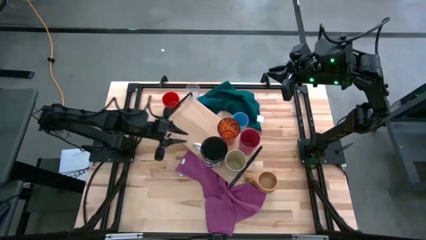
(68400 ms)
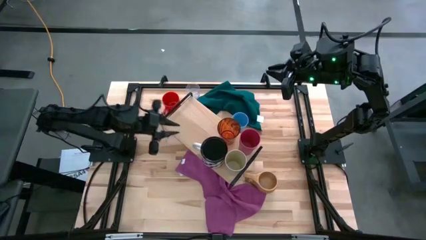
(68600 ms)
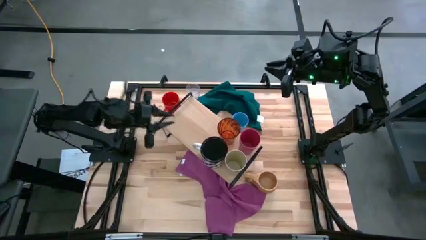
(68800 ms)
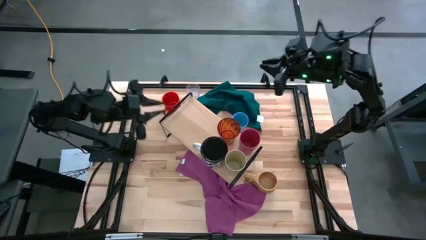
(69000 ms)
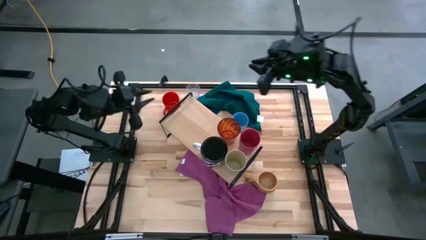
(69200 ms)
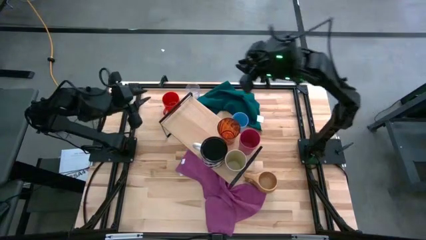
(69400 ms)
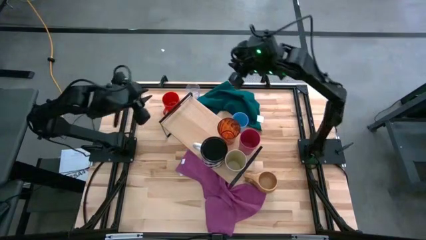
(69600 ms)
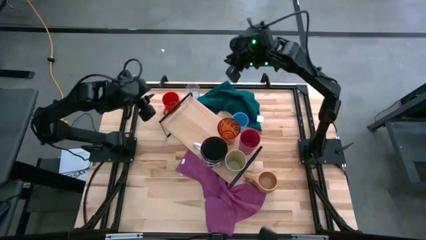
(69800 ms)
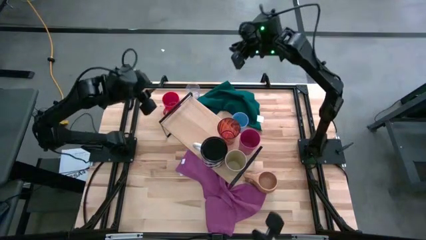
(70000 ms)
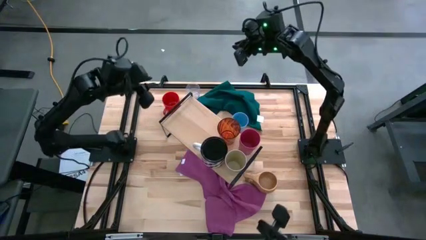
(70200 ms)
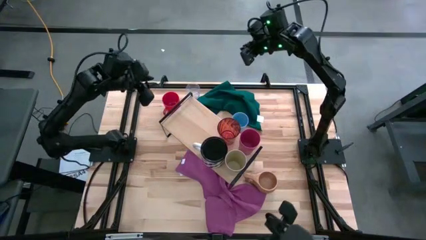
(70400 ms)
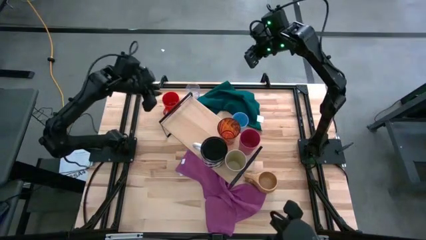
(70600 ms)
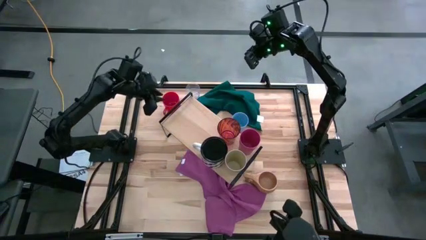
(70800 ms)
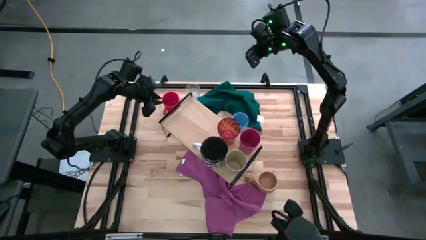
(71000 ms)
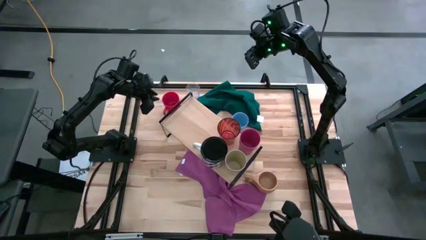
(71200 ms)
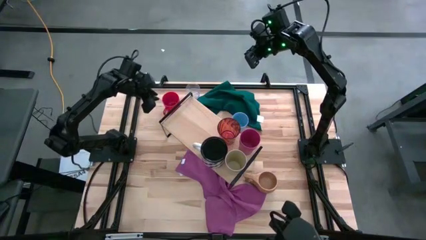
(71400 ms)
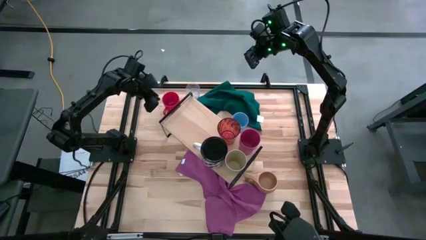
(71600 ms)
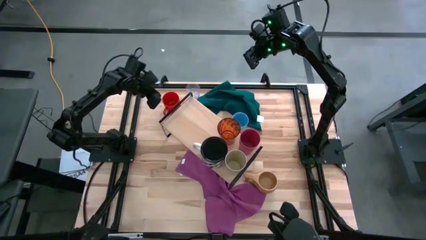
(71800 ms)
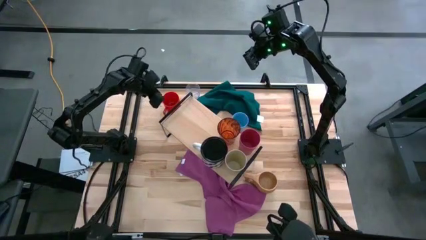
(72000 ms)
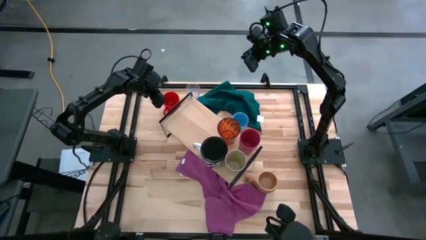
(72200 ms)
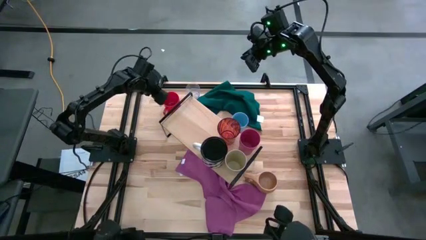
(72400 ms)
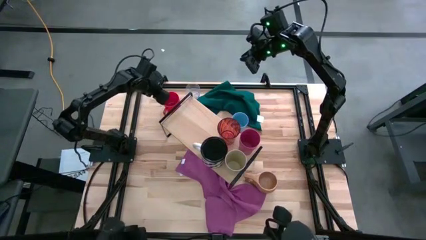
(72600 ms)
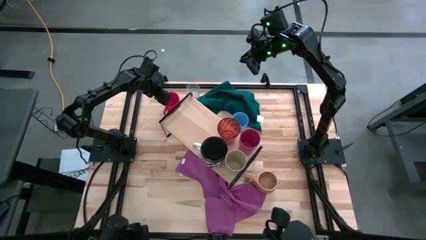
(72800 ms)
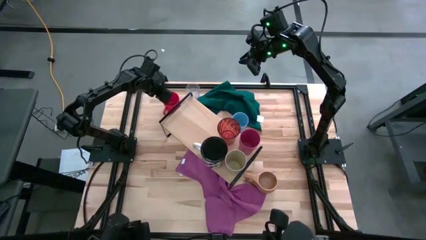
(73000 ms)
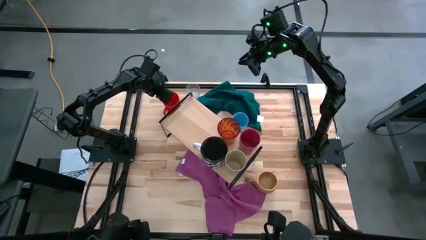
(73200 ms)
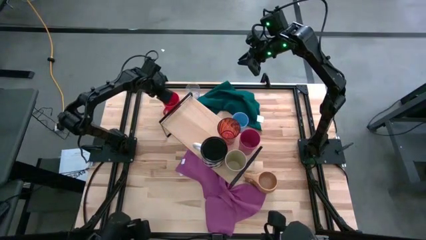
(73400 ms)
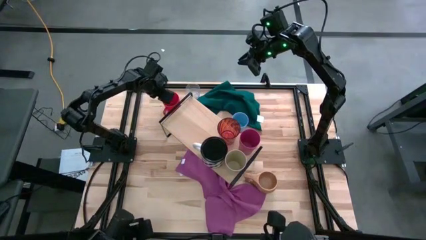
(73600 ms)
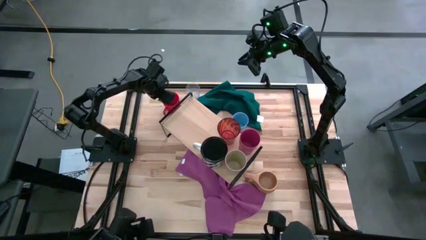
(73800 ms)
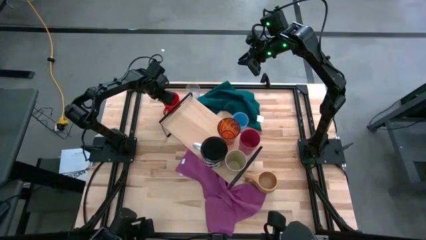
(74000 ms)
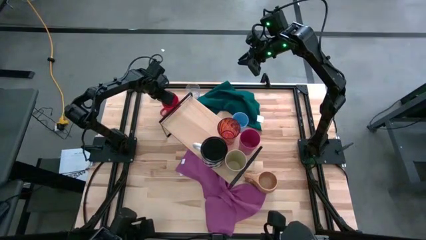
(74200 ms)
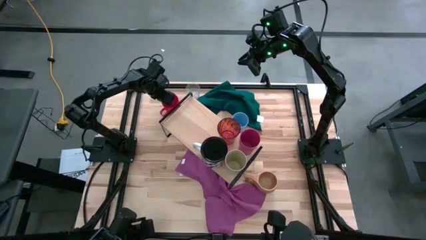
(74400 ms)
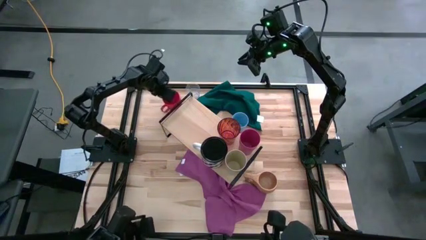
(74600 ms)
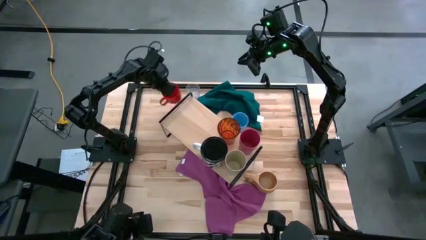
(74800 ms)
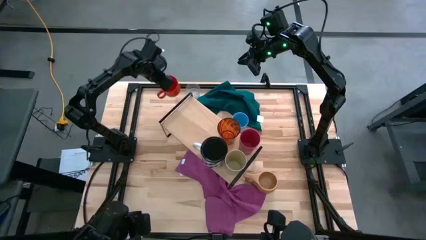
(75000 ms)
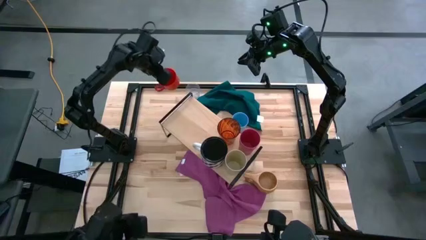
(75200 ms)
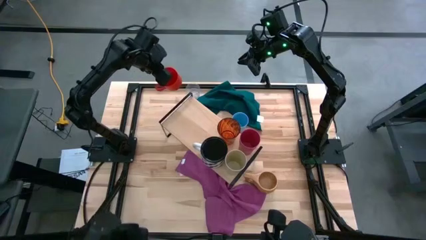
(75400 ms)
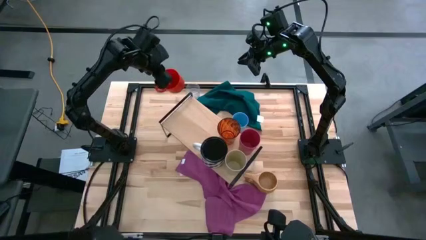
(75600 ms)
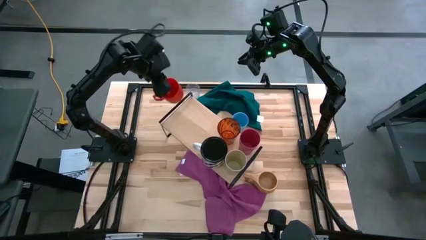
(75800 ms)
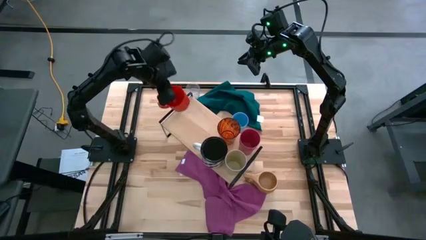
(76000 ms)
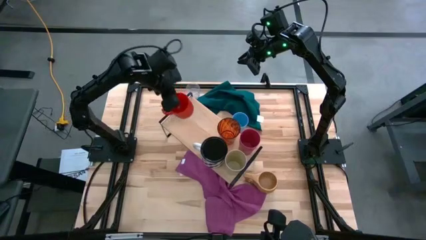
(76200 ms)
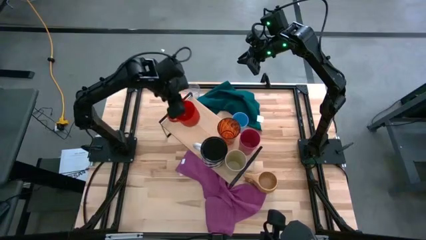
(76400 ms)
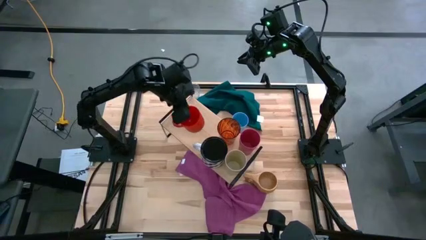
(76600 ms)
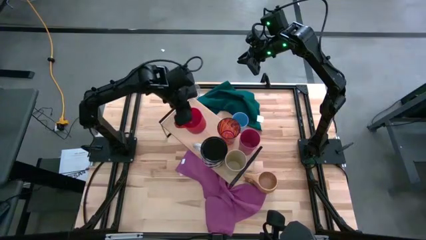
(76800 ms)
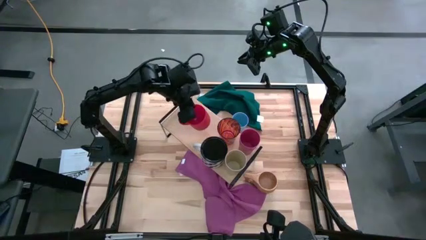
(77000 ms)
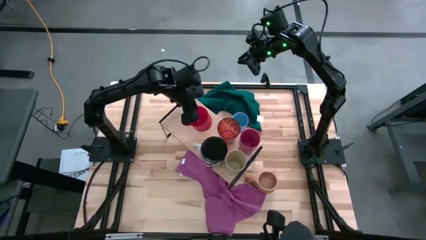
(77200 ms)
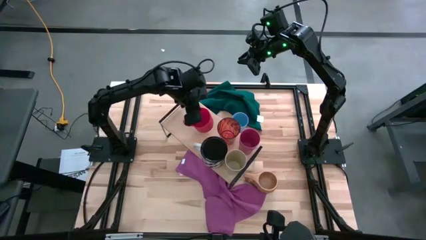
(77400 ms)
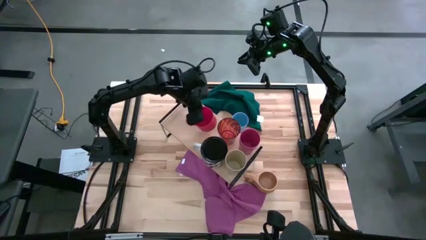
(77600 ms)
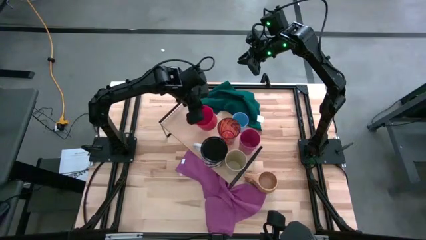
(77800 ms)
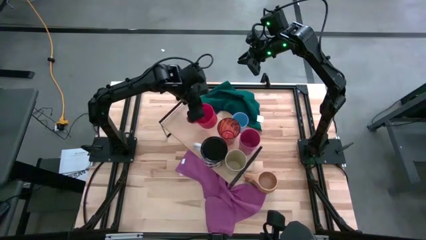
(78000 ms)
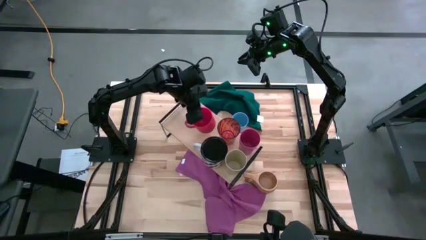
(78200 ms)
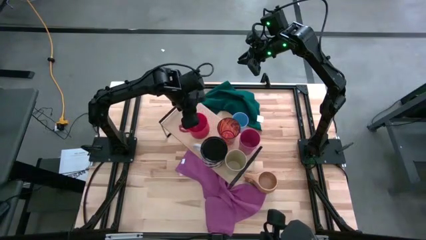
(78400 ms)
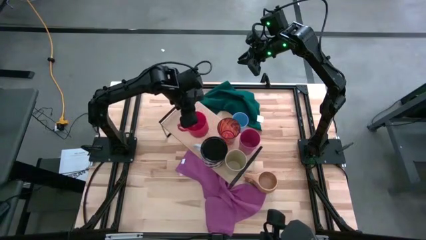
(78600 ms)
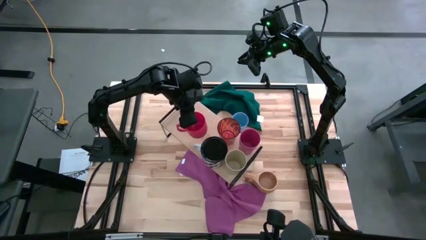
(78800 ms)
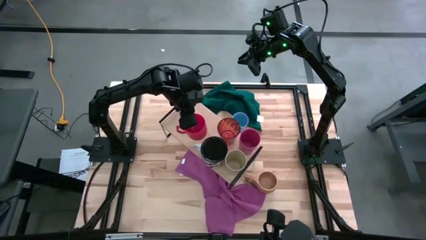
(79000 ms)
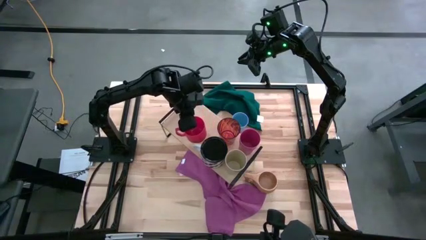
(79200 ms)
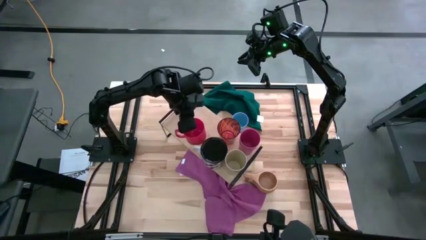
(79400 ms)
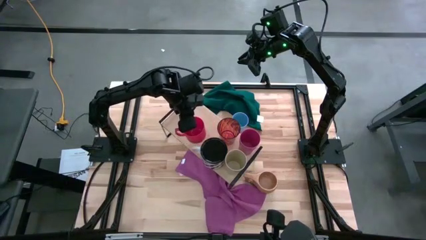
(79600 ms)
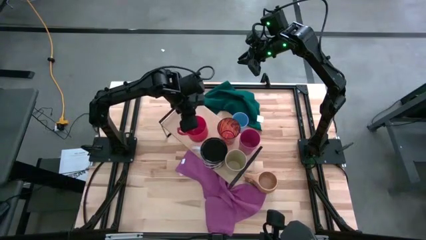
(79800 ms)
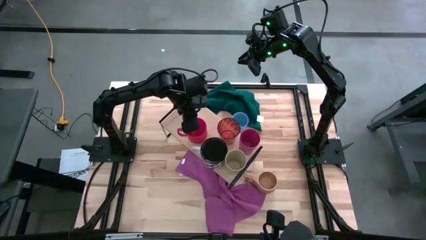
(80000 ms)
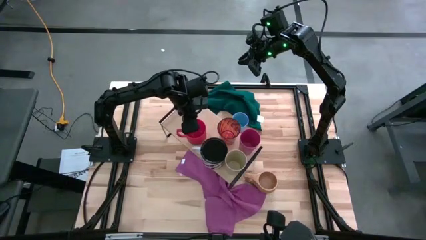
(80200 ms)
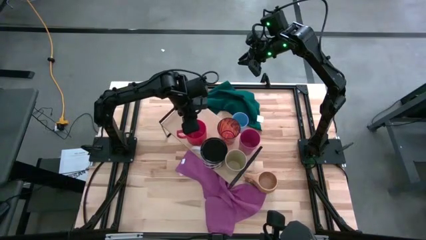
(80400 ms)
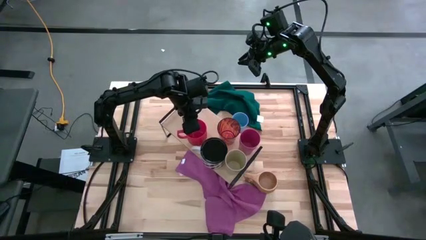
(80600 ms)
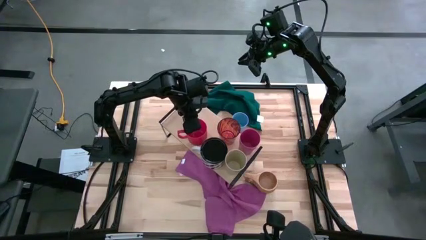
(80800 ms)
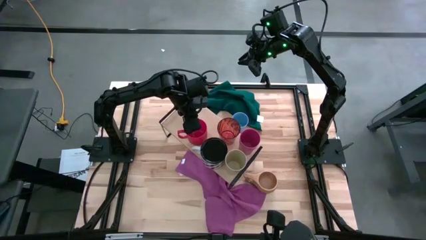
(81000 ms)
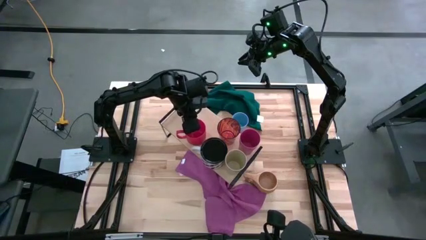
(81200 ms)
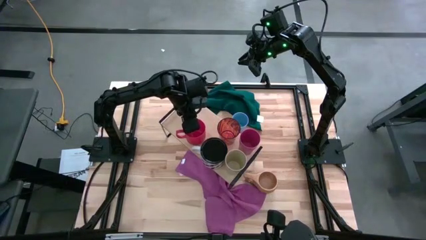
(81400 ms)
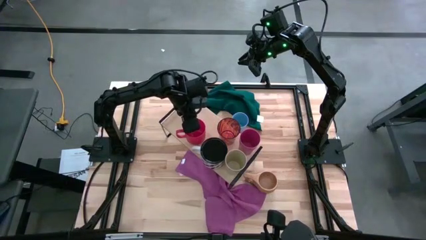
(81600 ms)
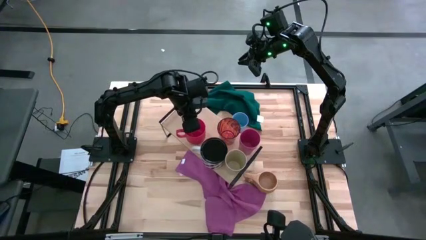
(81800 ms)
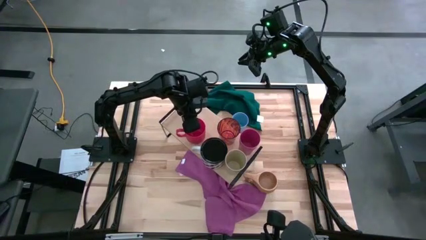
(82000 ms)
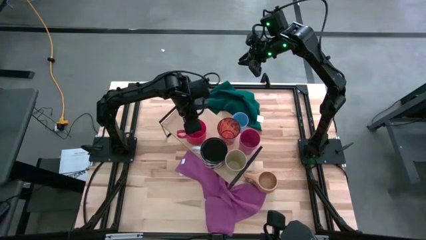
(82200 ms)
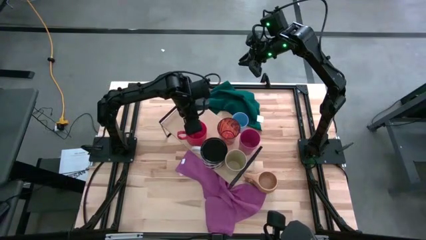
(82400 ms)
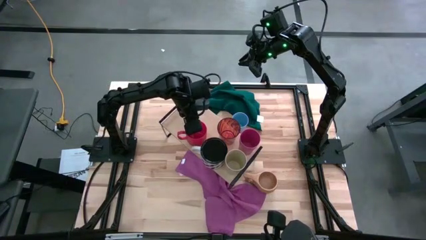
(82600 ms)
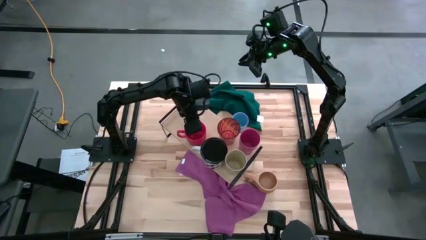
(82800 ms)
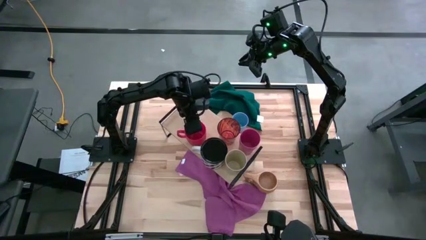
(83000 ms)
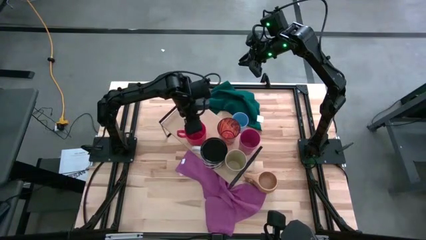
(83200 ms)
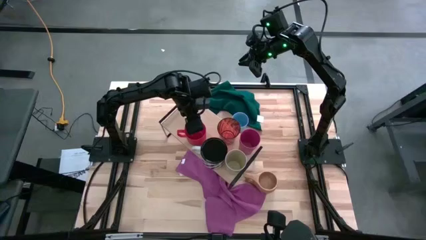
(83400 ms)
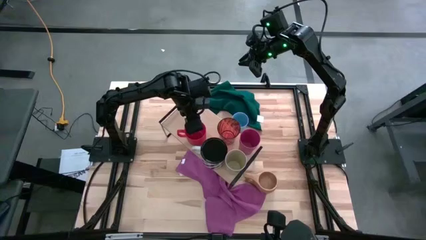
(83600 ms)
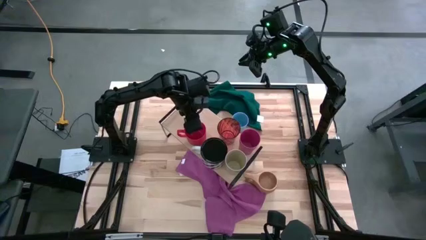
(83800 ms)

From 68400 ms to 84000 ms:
Task: Stack small to large cups/mugs on shelf
Put the red mug on the shelf

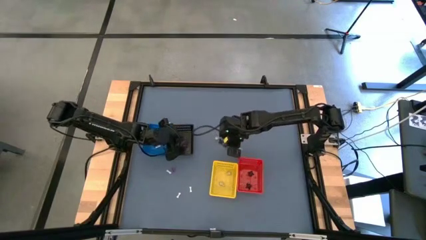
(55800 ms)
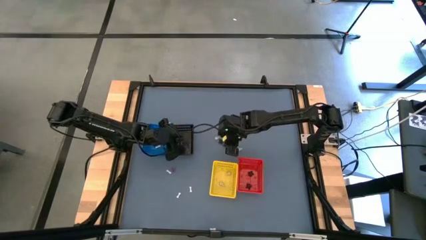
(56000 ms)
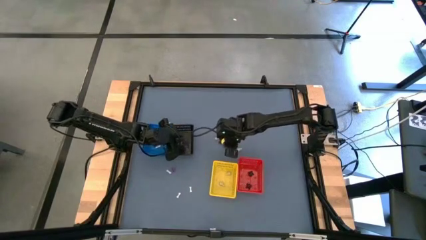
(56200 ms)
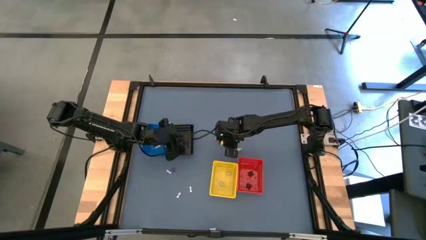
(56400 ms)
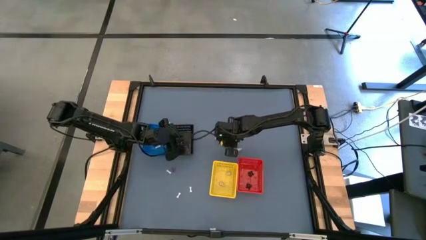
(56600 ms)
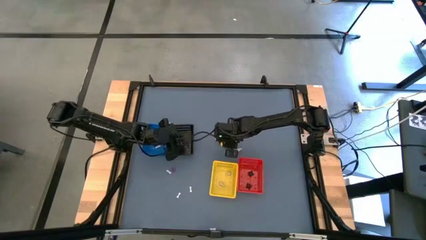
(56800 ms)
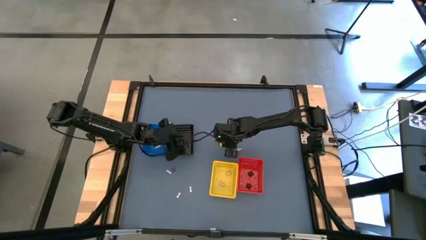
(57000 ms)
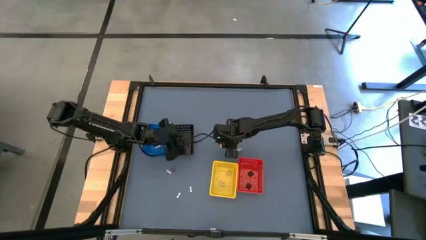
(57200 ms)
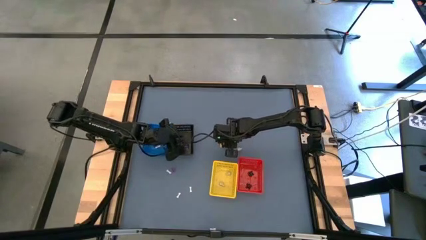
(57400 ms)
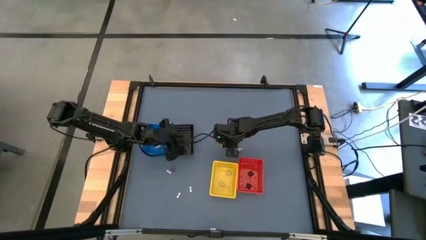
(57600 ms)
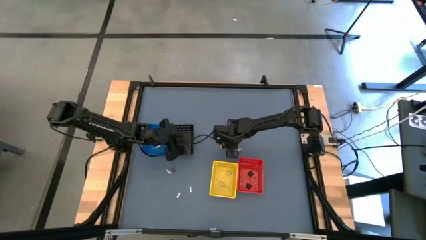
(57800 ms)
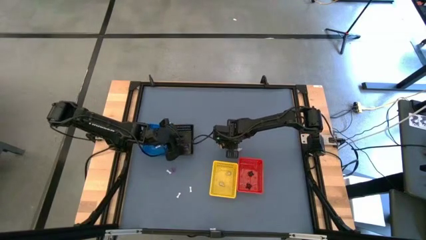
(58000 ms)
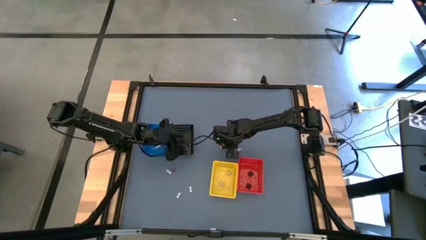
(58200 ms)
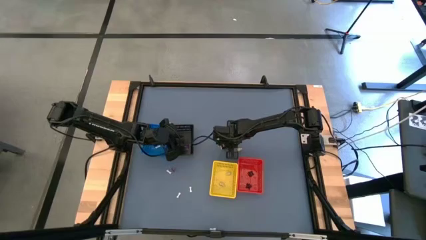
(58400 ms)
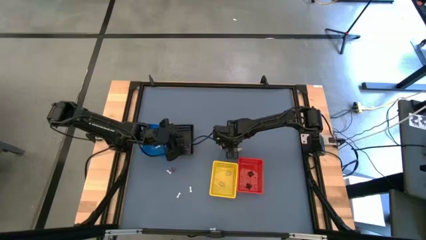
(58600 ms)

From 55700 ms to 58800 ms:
Task: Sort Halloween decoration
Put the skull toy into the yellow bin
